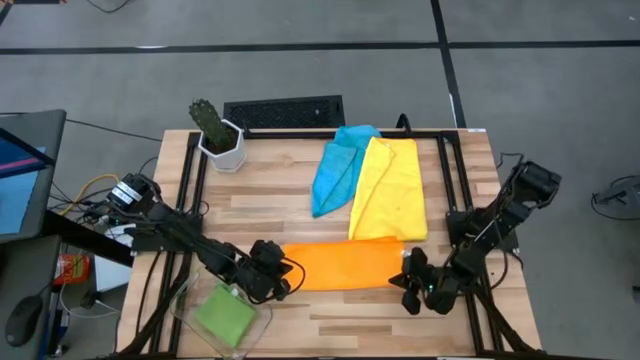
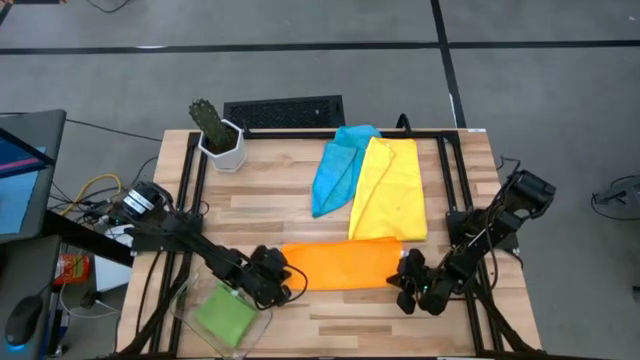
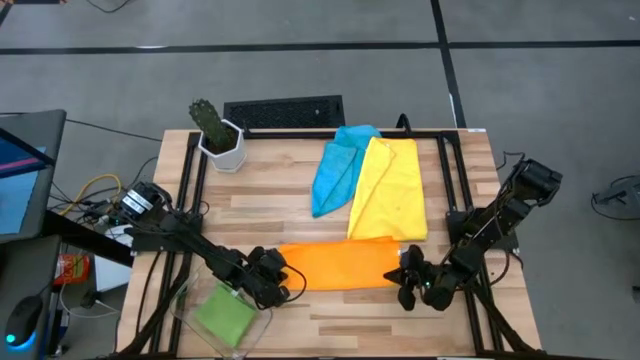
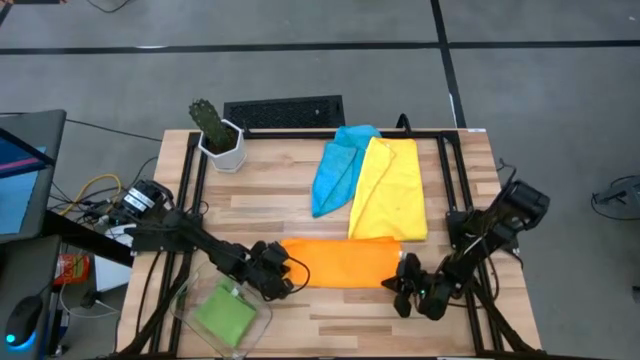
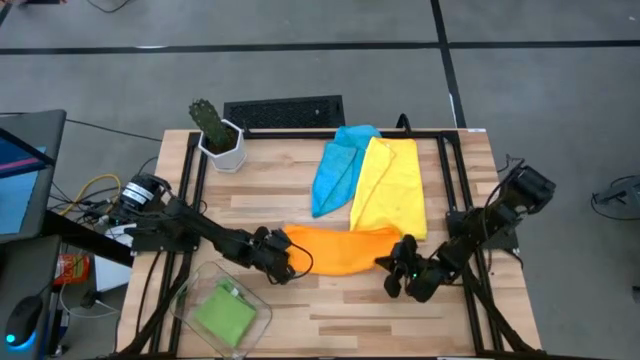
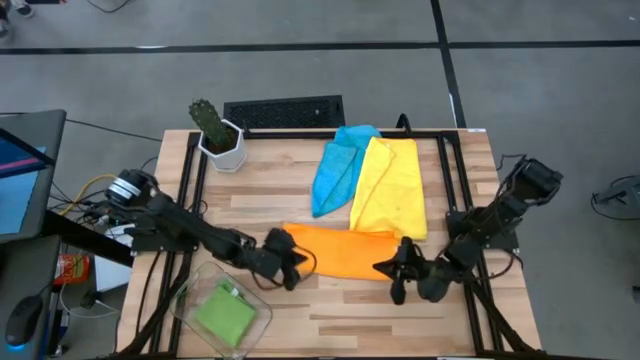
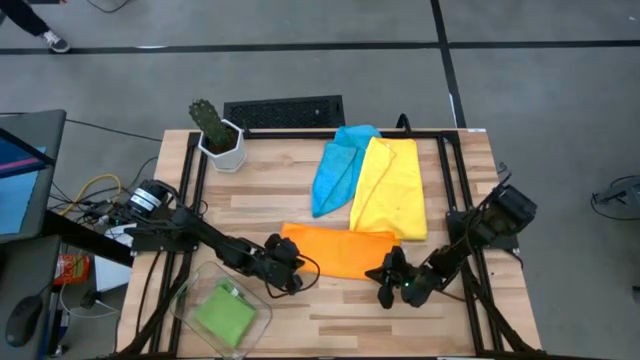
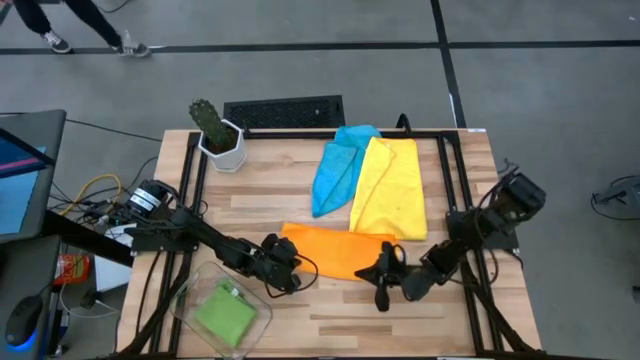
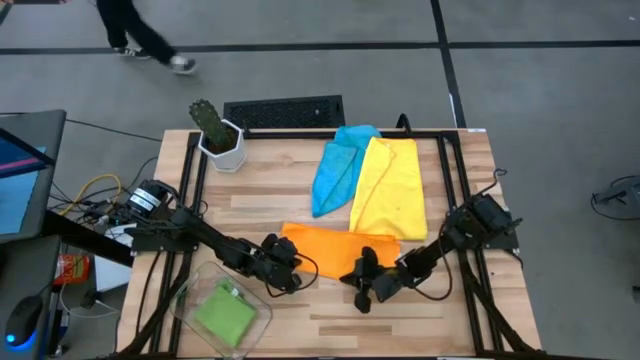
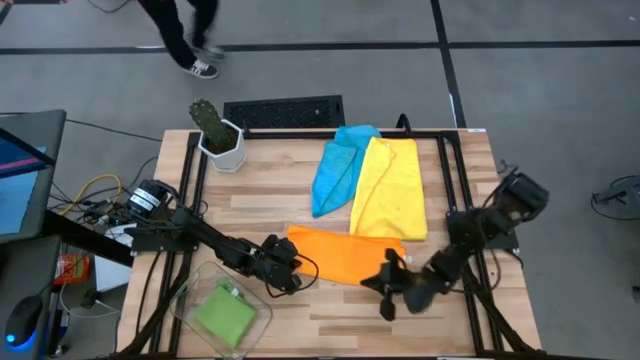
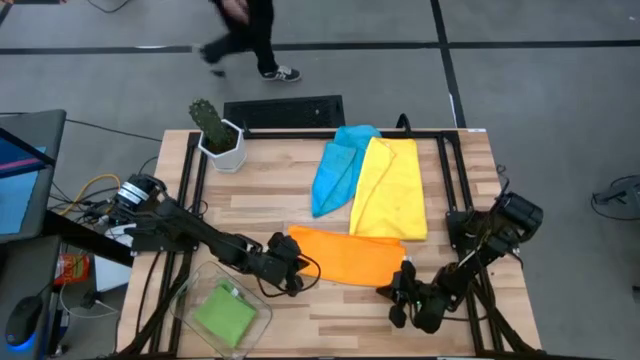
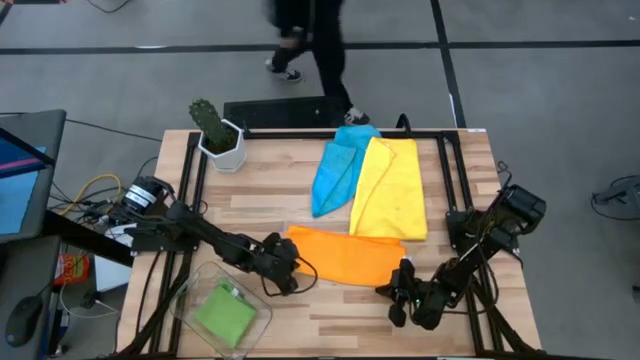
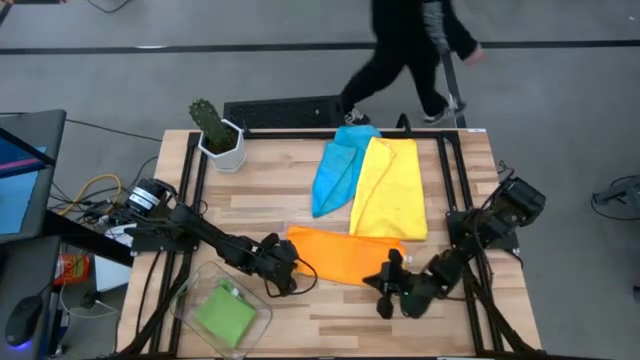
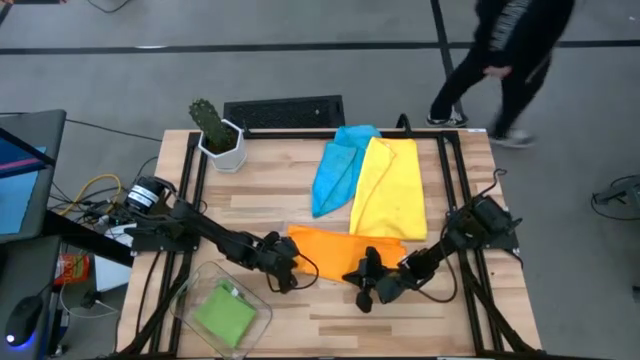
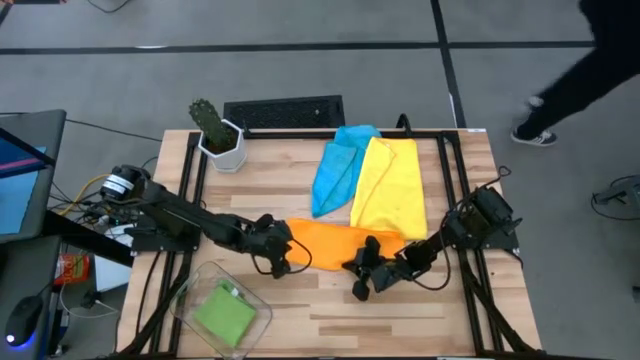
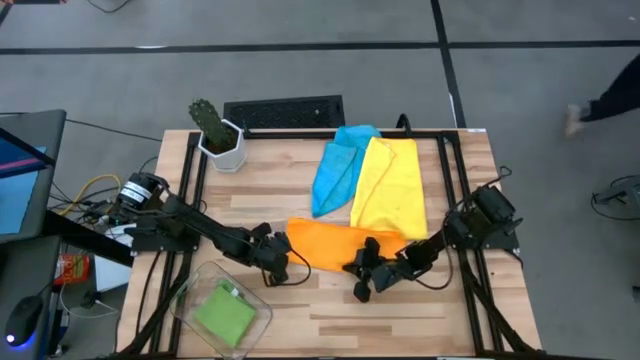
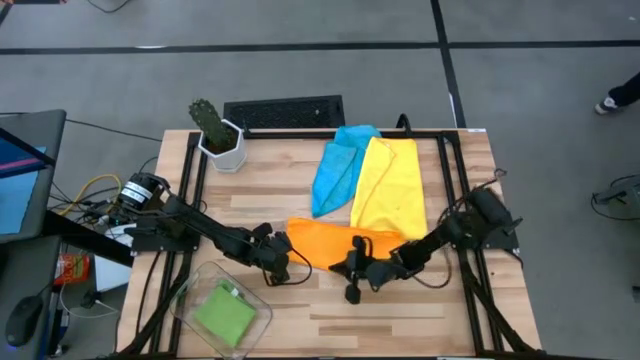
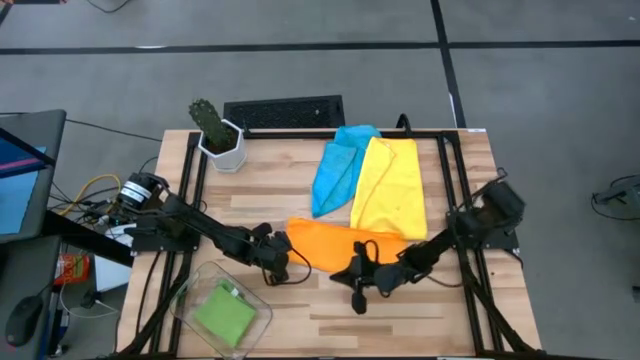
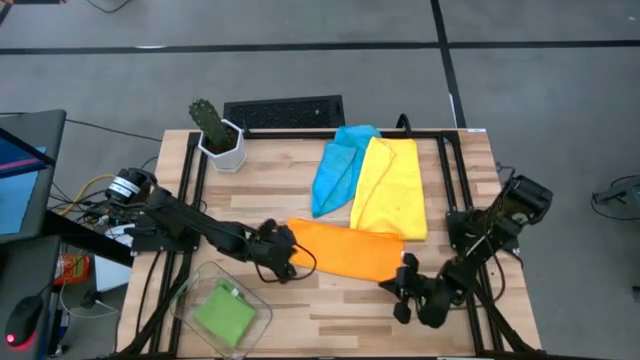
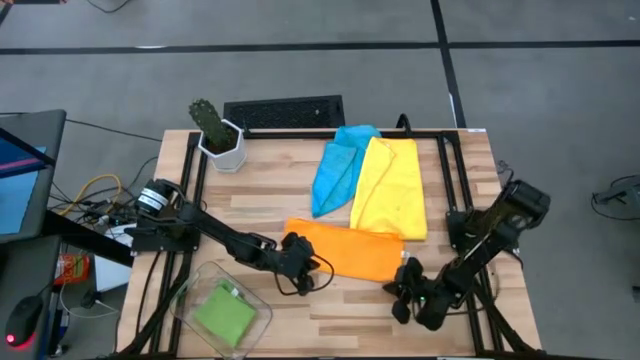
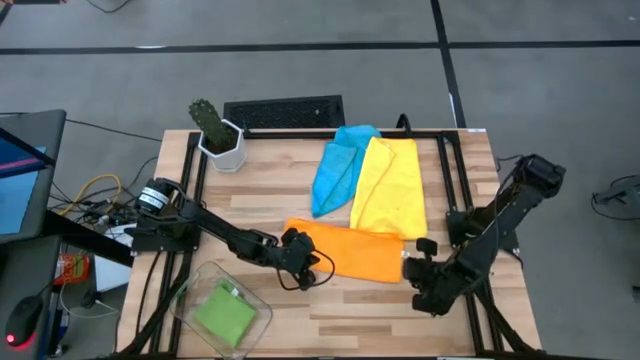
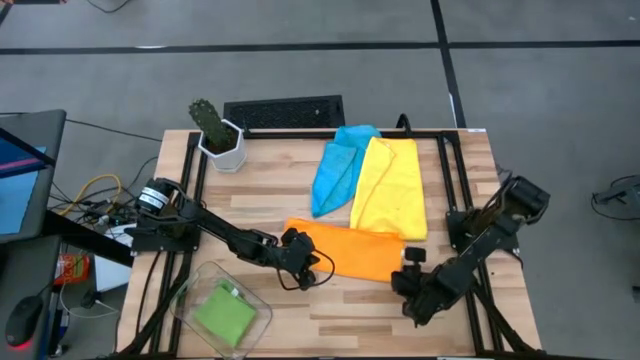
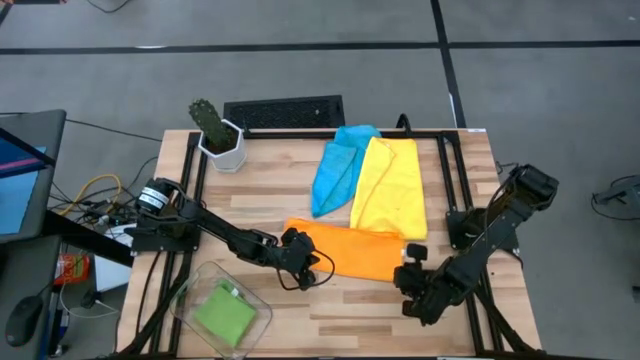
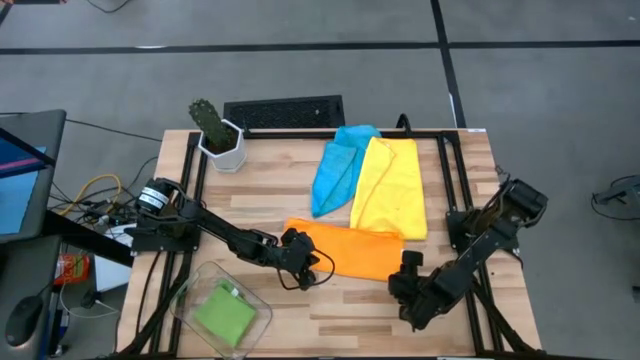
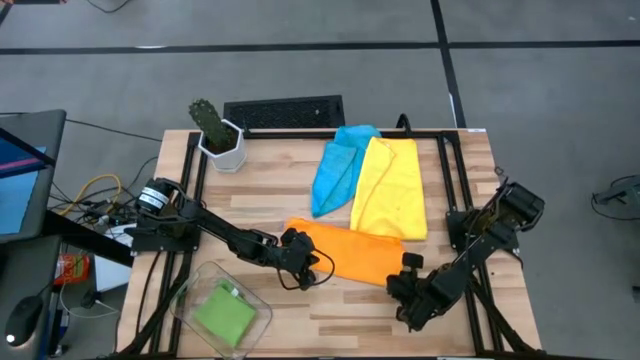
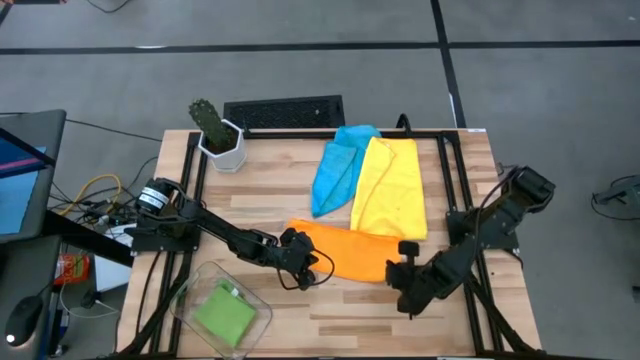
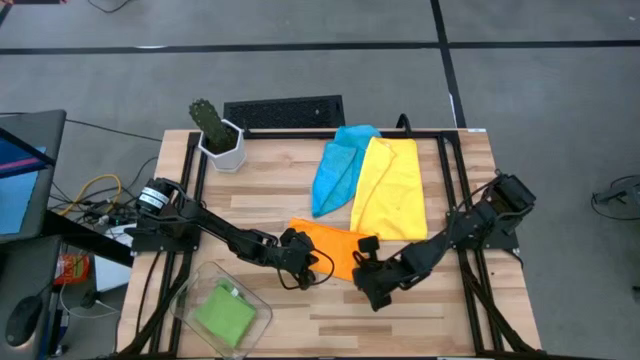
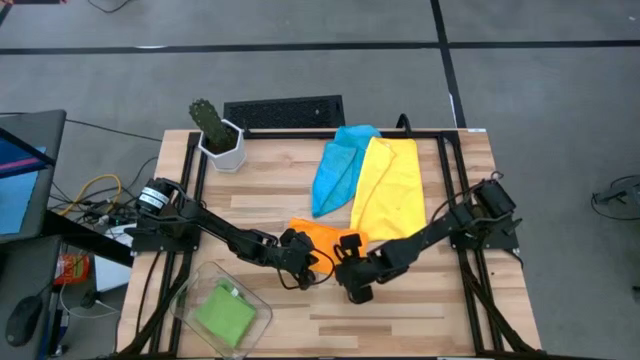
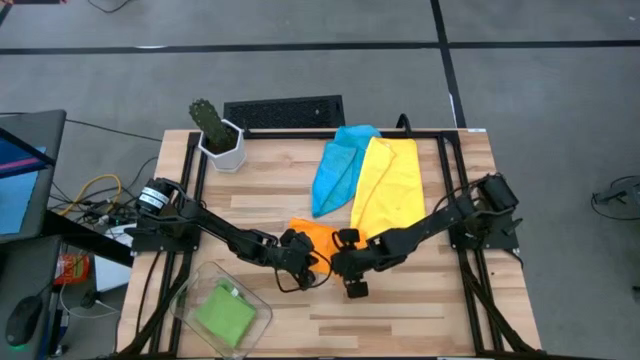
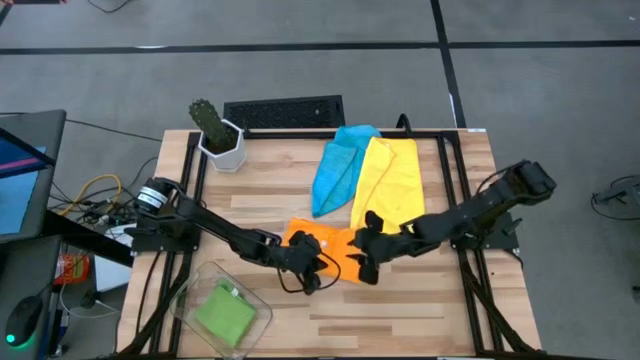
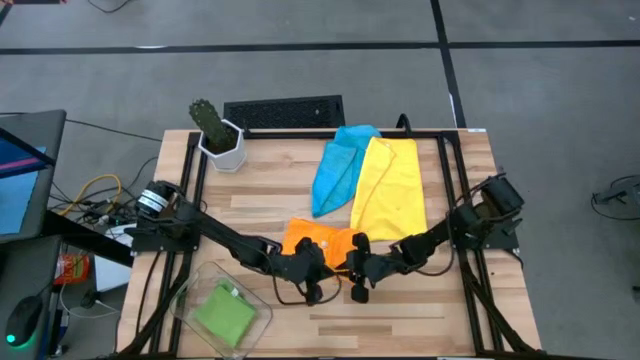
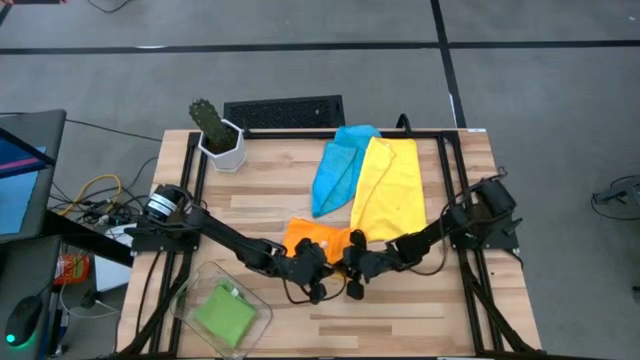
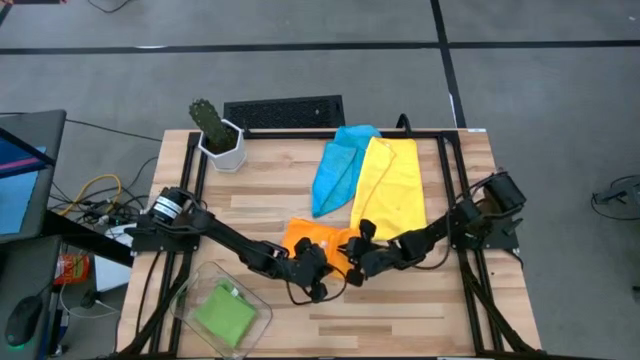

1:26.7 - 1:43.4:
Task: Fold microfiber towels
Fold the orange microfiber towel

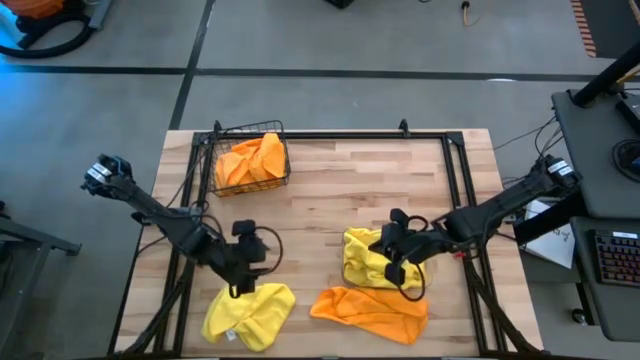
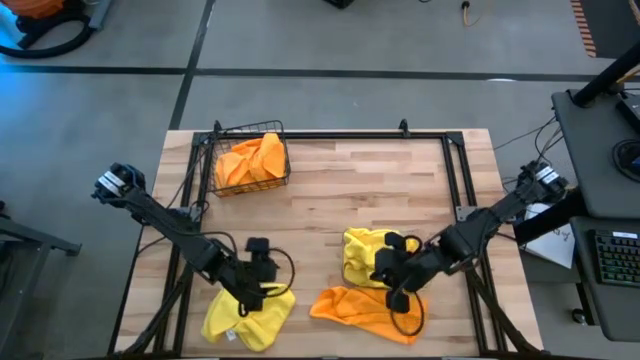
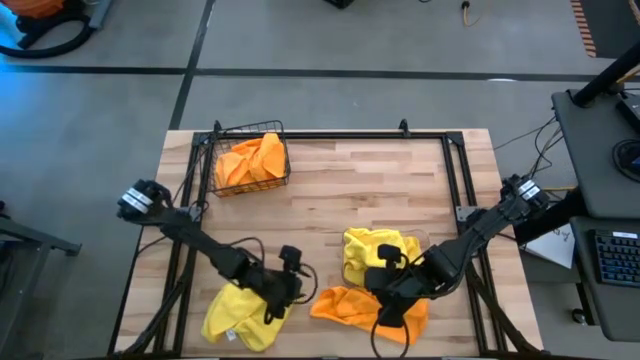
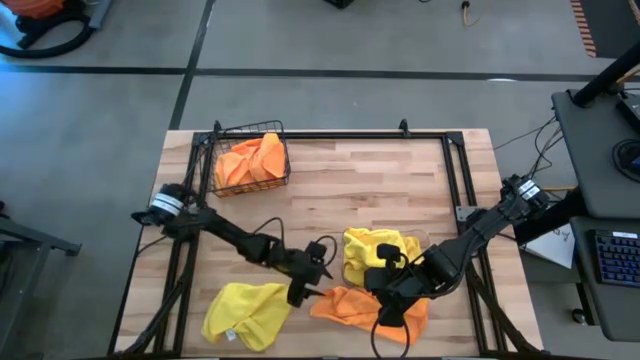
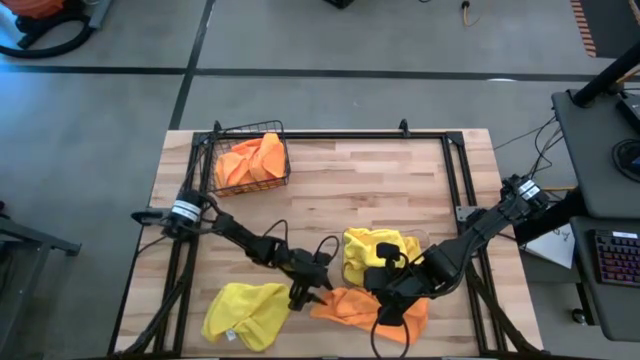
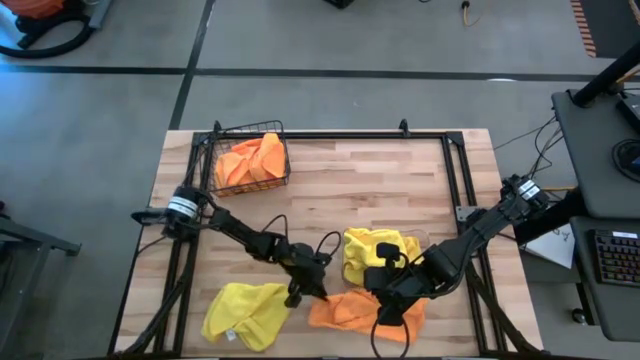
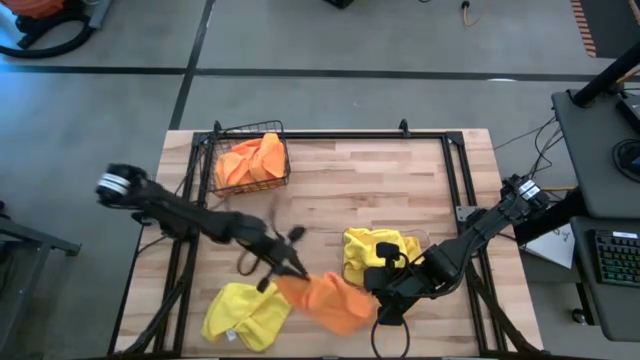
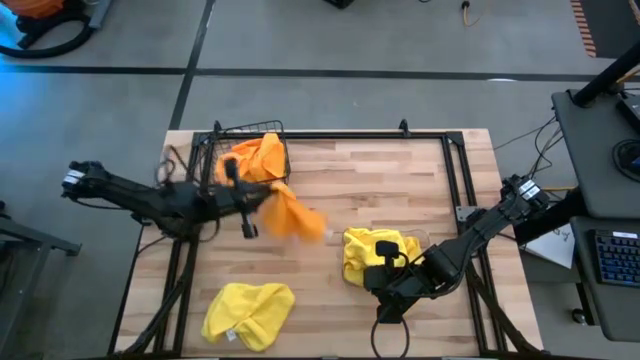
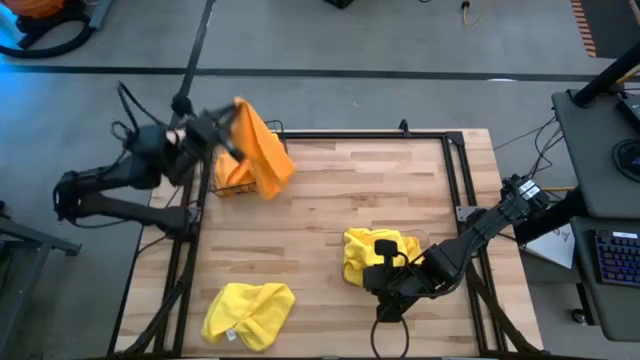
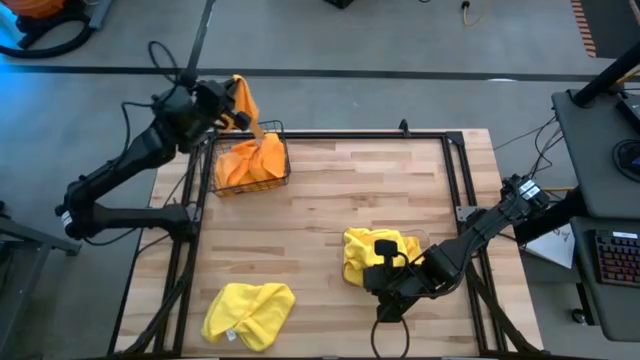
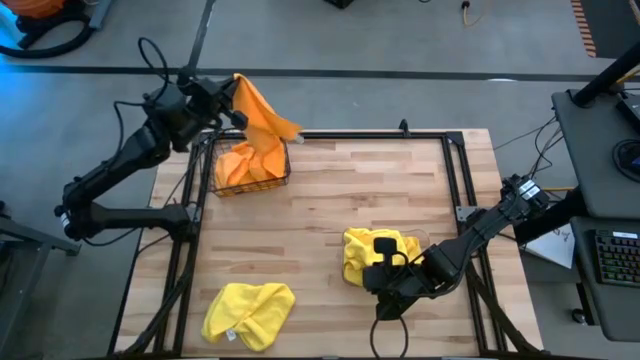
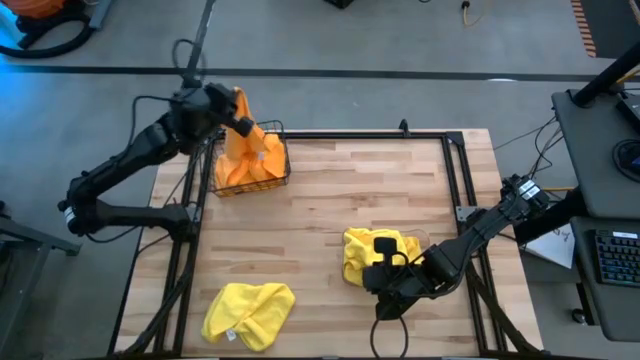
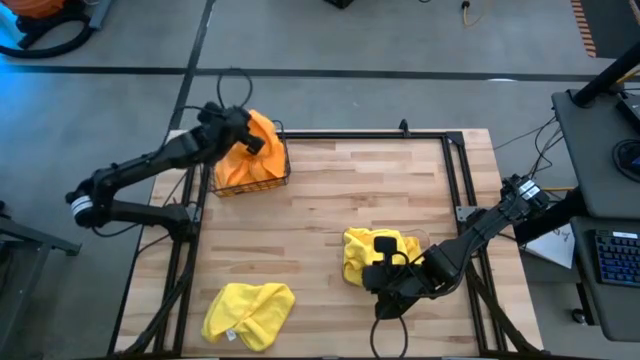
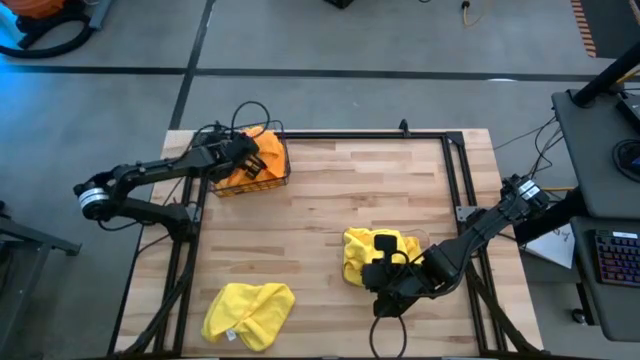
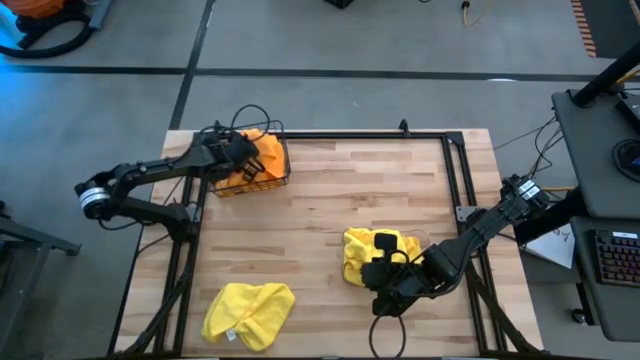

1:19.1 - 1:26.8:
Task: Sort microfiber towel by color & place in baskets
Put the orange towel into the black basket
